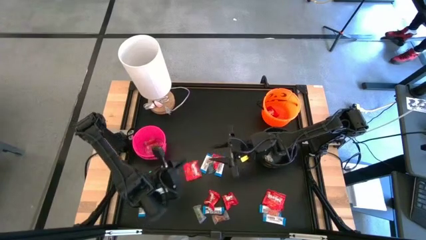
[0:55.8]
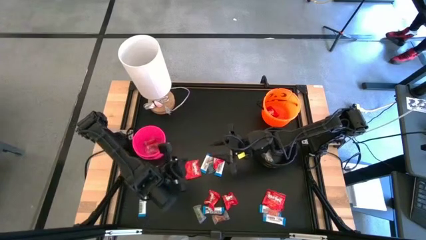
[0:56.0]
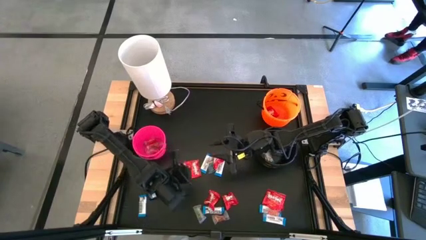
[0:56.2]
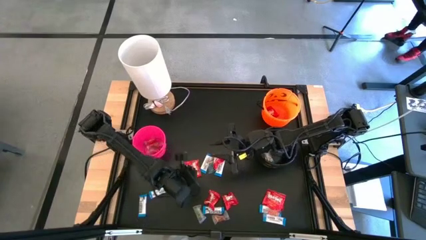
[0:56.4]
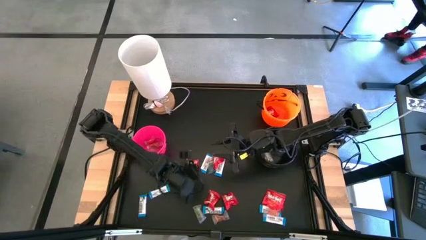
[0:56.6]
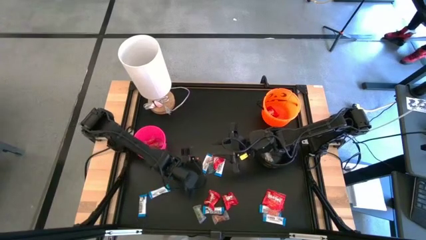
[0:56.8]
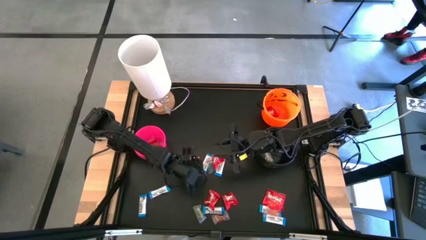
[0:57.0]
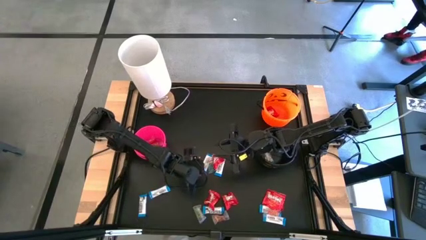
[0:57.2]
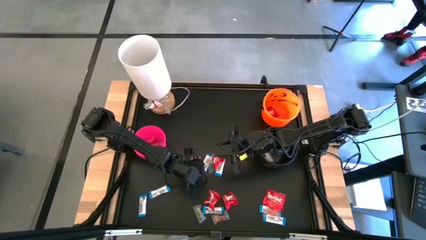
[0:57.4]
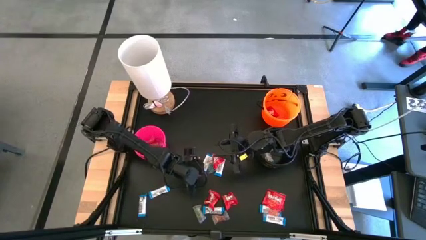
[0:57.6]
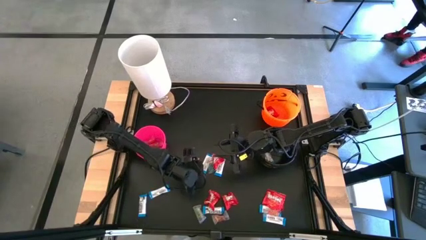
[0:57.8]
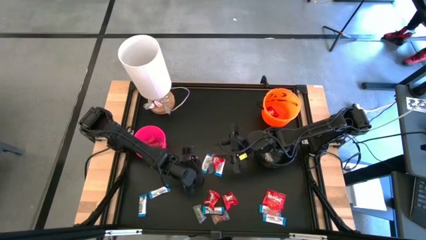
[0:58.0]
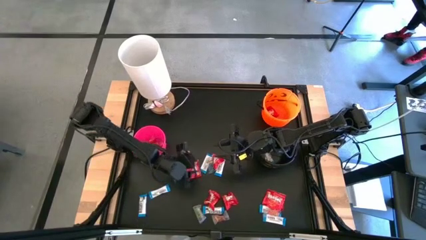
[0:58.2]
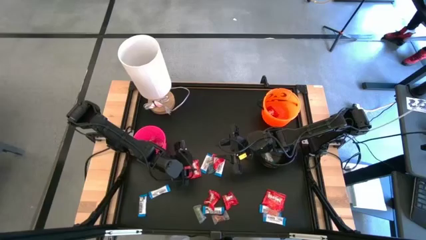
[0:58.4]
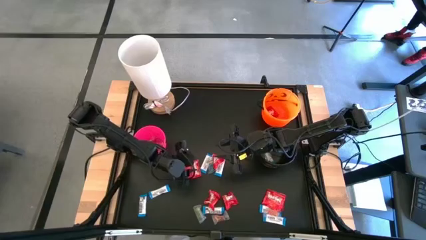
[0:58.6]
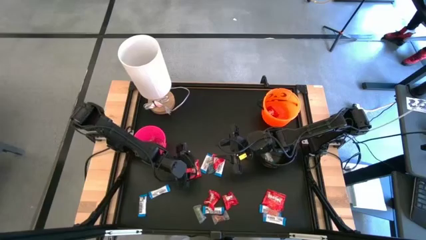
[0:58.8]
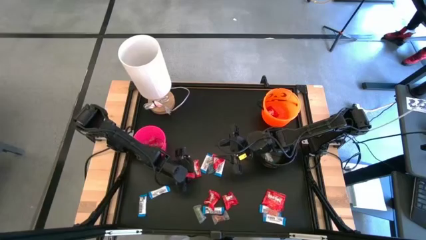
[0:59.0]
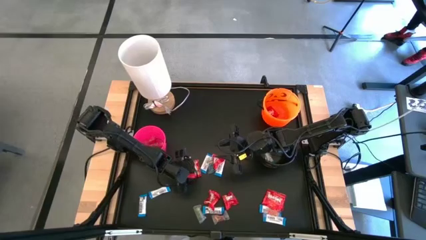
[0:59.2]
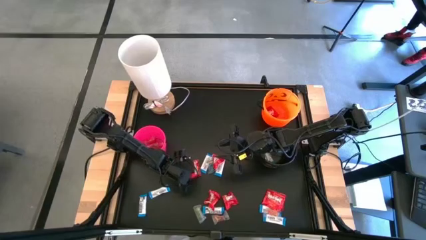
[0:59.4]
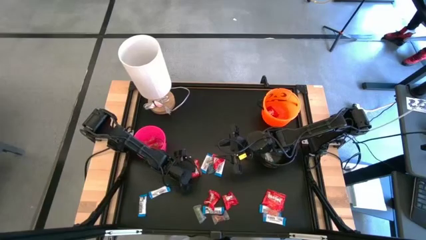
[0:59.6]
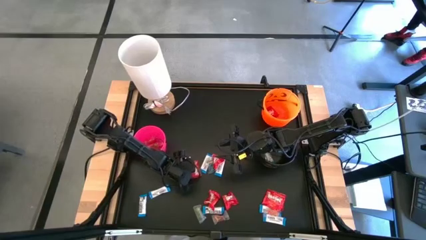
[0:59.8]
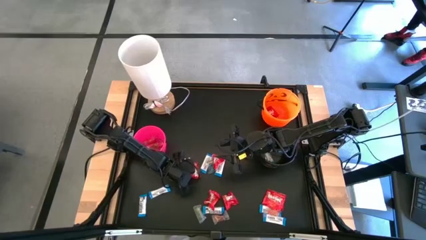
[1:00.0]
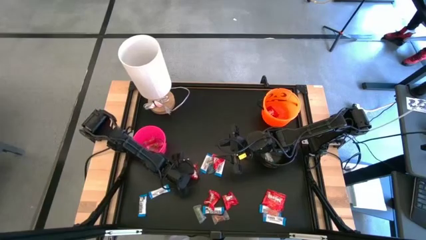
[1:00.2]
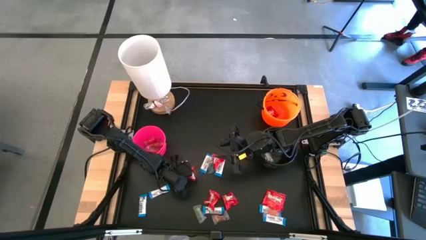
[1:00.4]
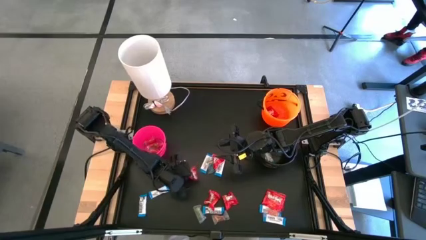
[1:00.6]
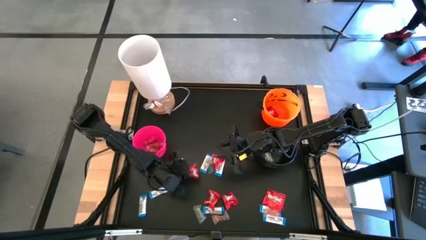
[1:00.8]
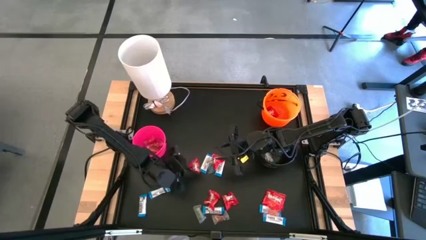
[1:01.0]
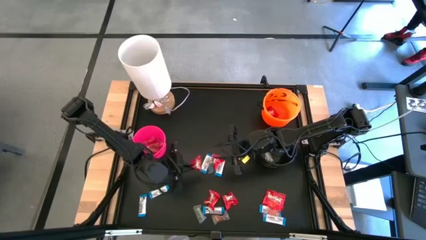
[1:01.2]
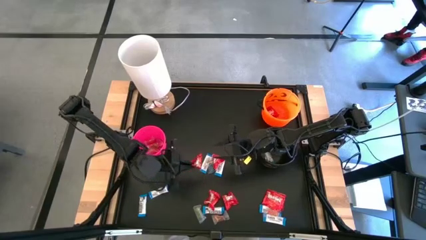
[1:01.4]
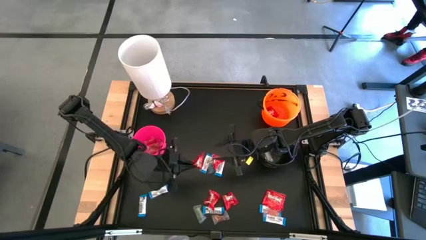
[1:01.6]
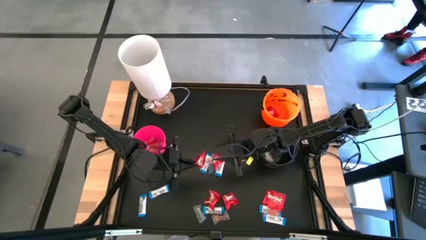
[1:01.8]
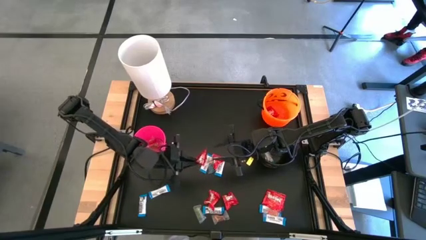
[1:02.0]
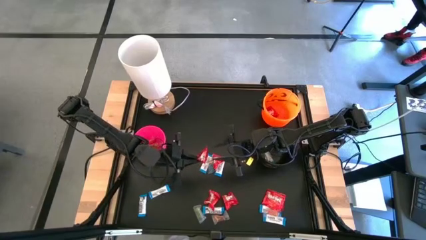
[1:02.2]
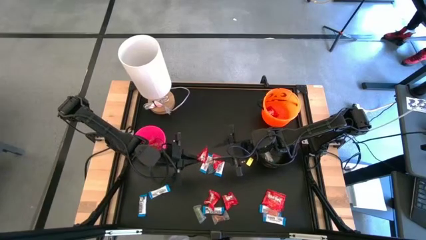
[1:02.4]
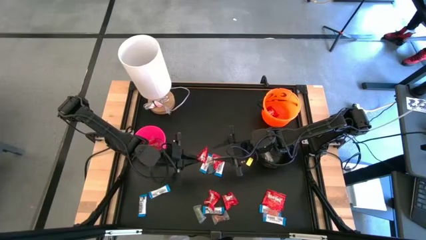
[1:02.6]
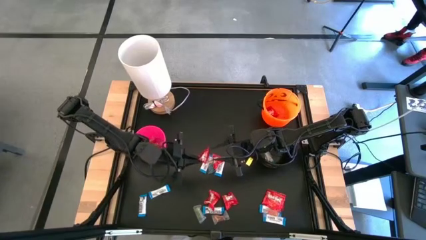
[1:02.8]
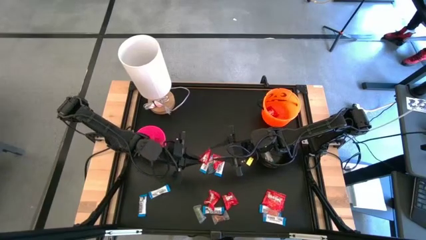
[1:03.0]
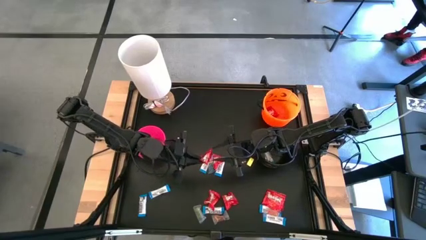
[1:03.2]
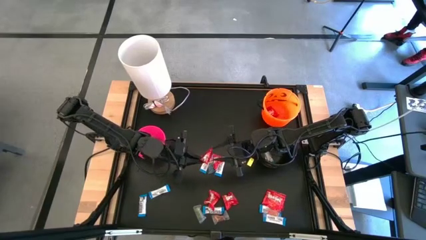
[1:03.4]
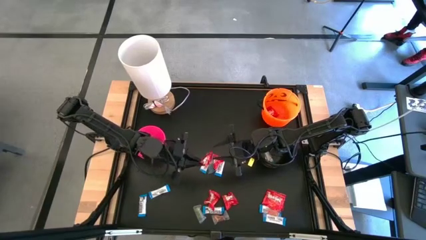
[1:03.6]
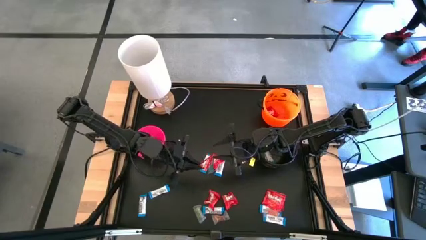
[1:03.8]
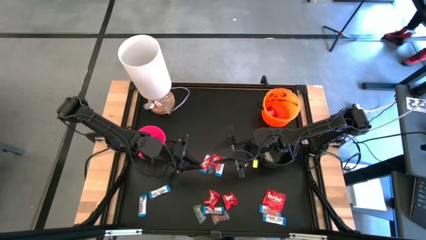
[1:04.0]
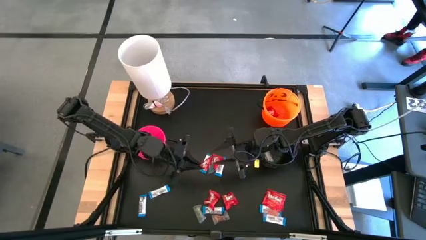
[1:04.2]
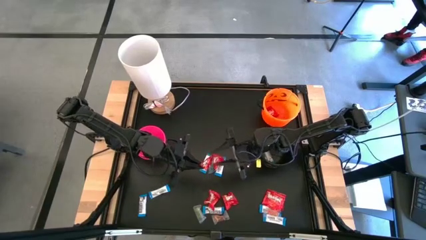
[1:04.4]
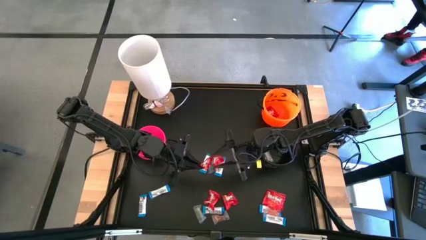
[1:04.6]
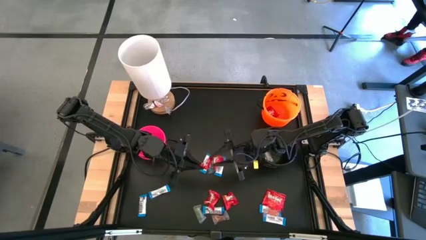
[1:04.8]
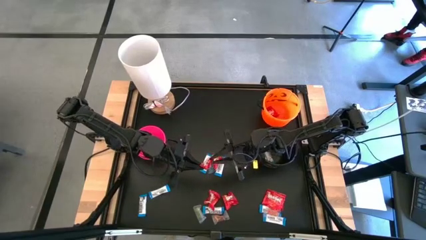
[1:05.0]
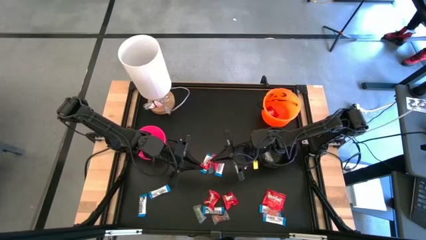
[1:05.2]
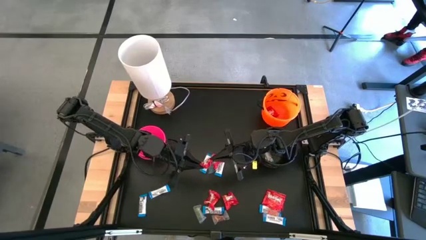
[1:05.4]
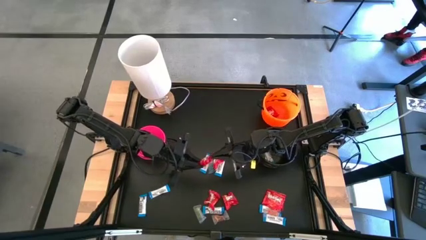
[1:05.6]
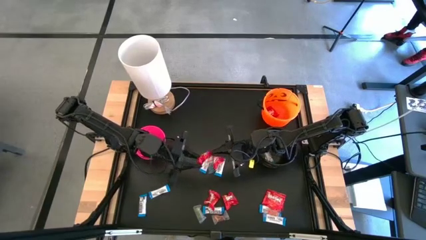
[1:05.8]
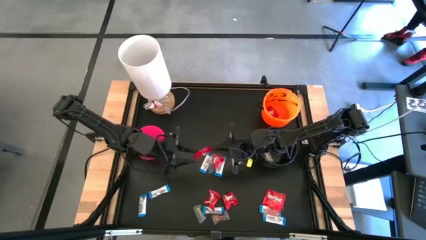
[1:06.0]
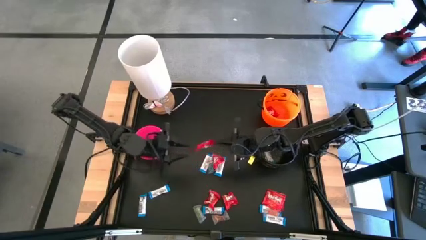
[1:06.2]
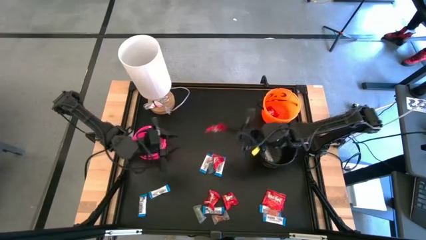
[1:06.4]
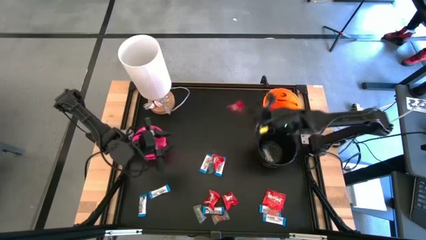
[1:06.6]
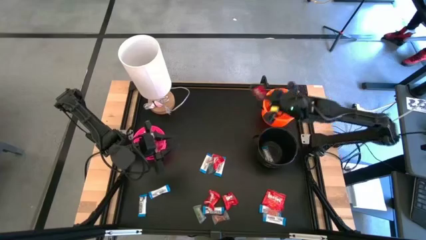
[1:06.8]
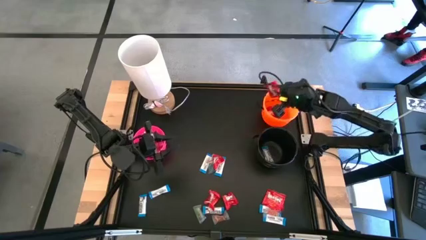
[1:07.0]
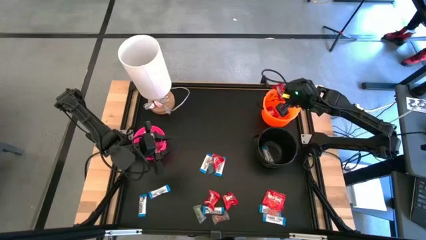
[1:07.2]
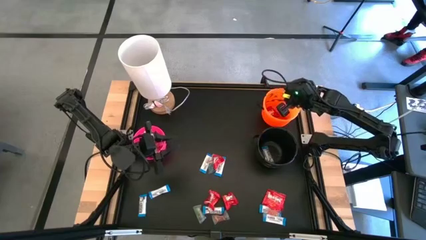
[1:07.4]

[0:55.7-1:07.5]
Task: Sort candy
Put the red candy into the orange bucket

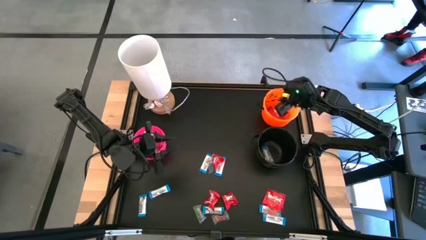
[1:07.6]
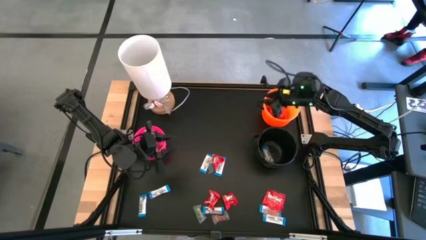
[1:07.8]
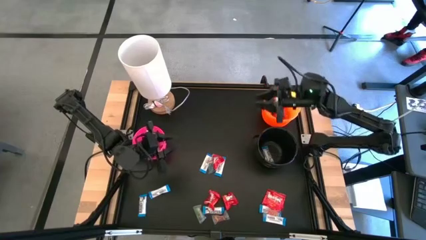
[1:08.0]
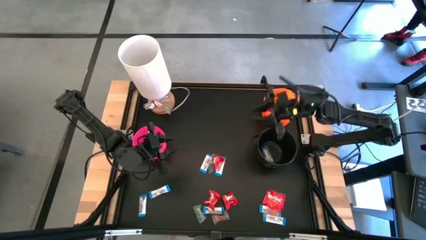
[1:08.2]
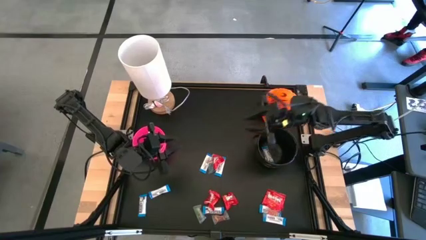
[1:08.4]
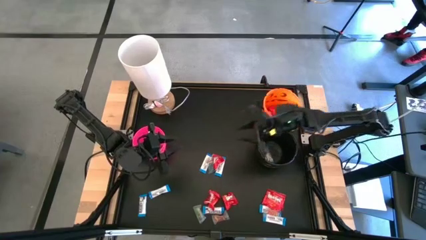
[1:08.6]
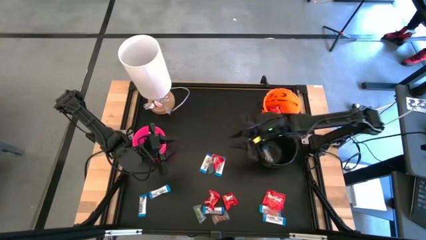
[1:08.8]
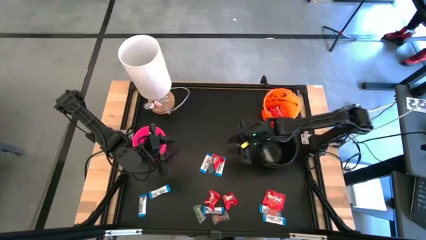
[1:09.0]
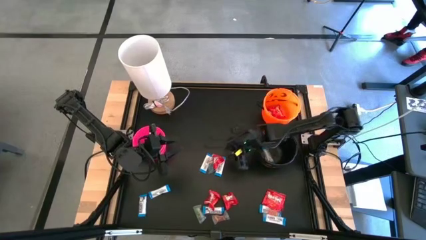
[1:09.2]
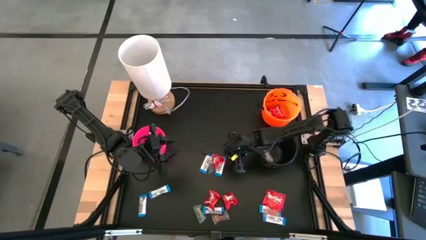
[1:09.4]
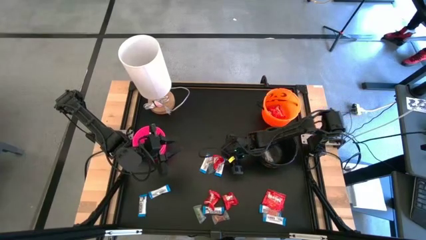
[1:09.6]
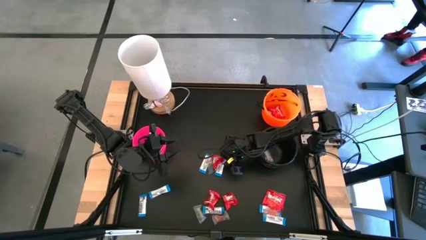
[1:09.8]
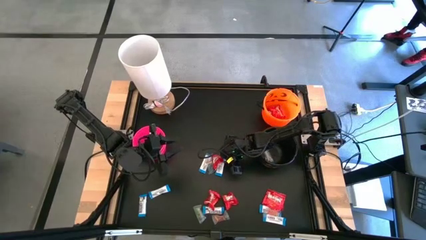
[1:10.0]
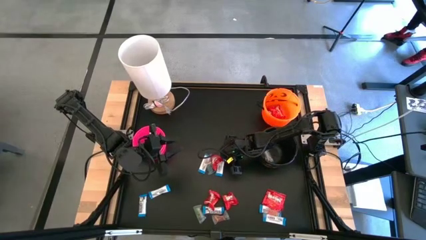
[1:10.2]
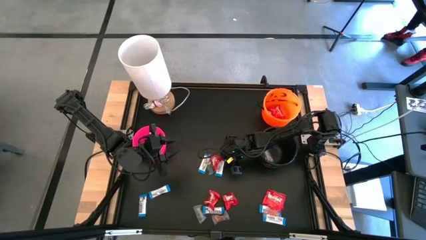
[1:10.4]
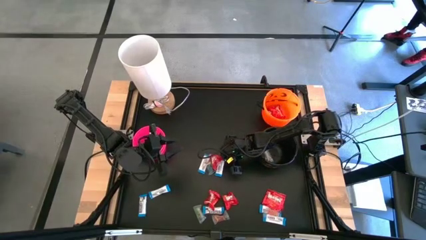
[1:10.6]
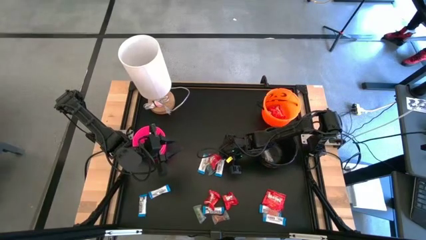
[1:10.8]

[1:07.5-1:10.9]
Put the red candy into the orange bucket

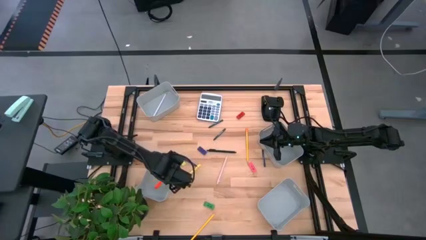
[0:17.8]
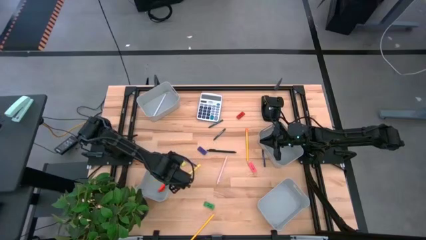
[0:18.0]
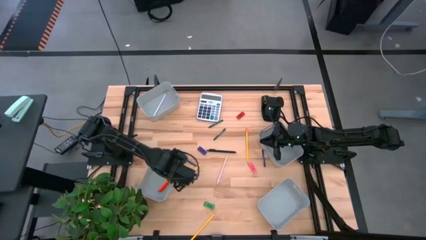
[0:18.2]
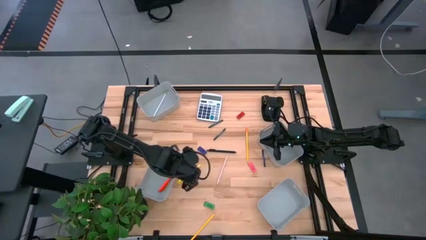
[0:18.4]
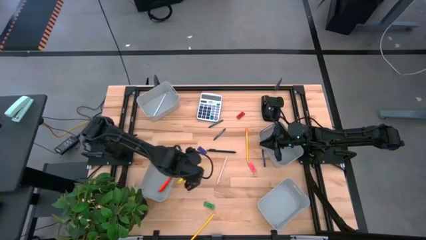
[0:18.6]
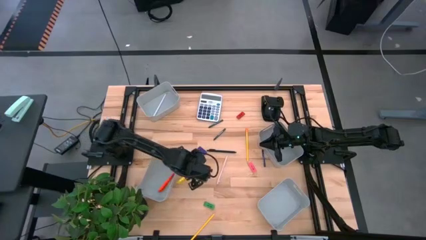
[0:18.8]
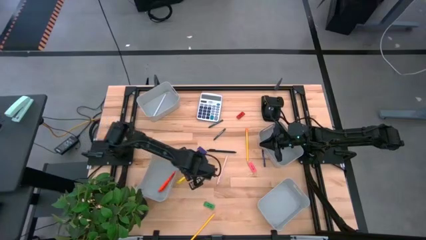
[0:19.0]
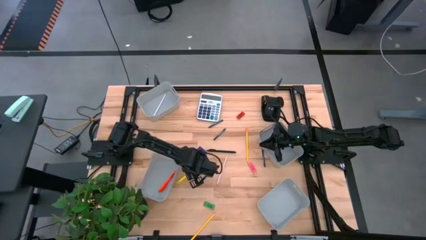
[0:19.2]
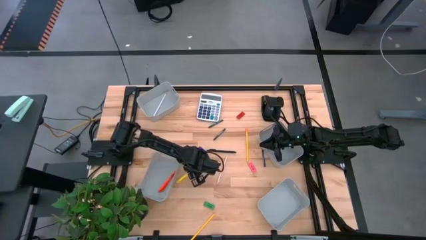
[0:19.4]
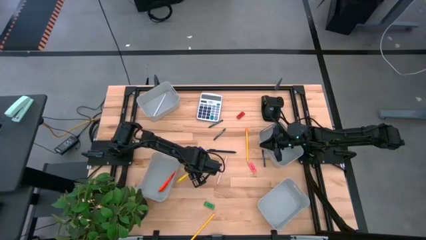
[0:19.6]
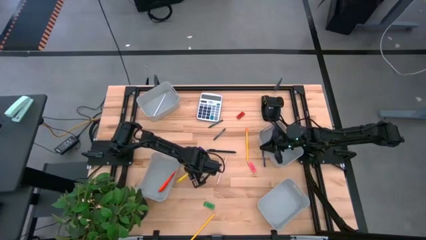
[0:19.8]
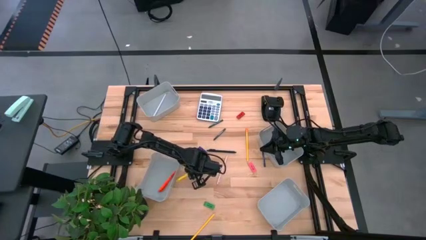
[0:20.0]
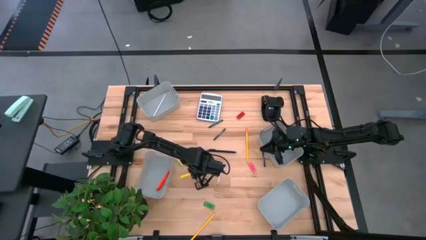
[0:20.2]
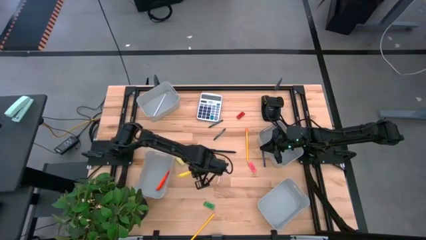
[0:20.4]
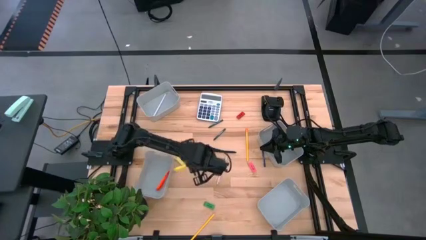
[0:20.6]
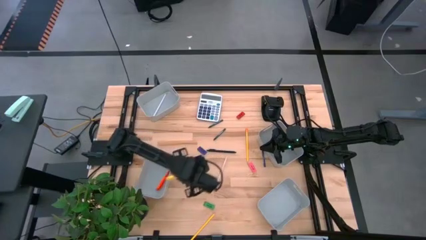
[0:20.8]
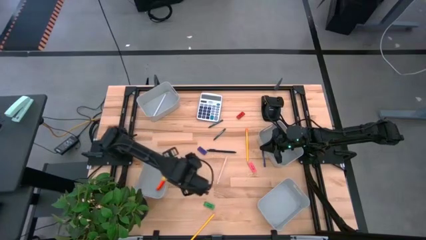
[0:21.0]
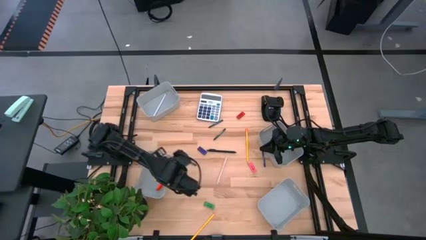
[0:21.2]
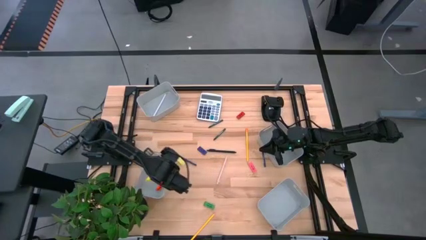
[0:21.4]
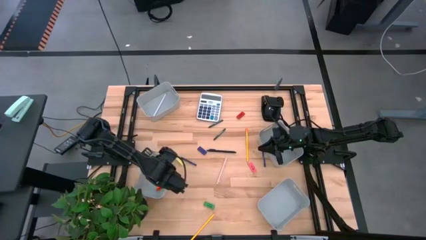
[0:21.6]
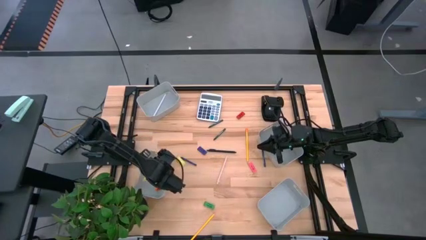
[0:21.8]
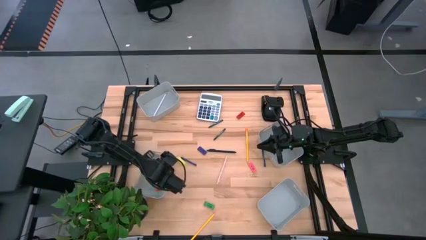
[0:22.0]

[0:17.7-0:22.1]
Task: Sort crayons/erasers/pens/pencils in bins
Put the yellow ballpen into the bottom left gray bin
